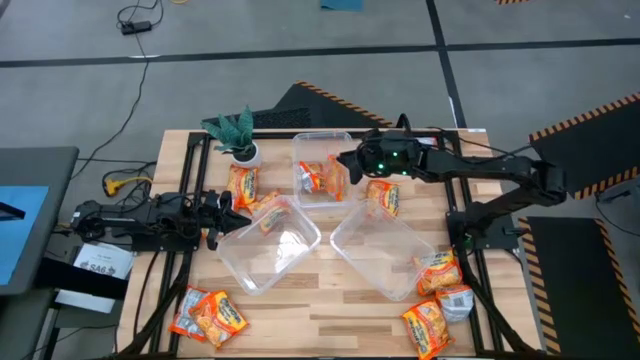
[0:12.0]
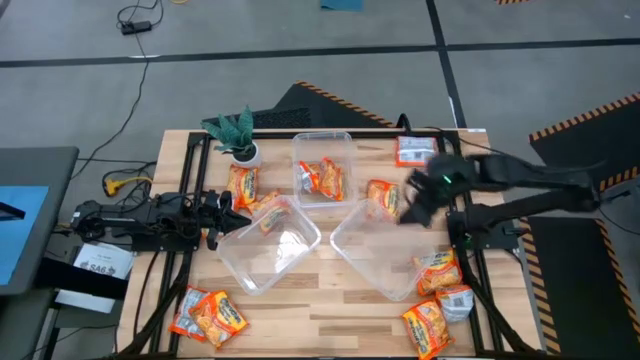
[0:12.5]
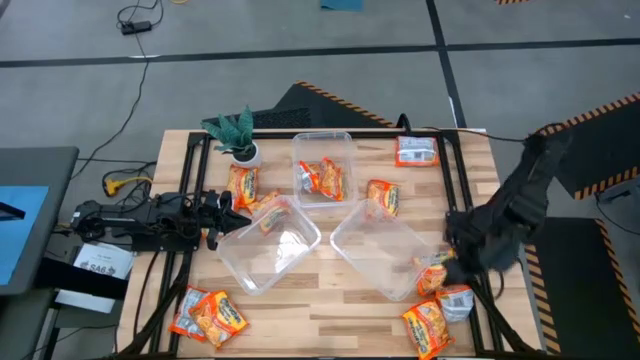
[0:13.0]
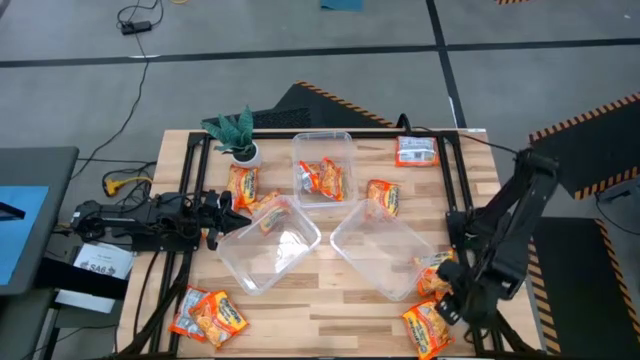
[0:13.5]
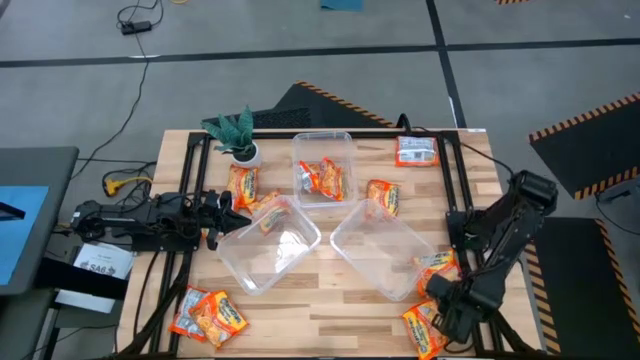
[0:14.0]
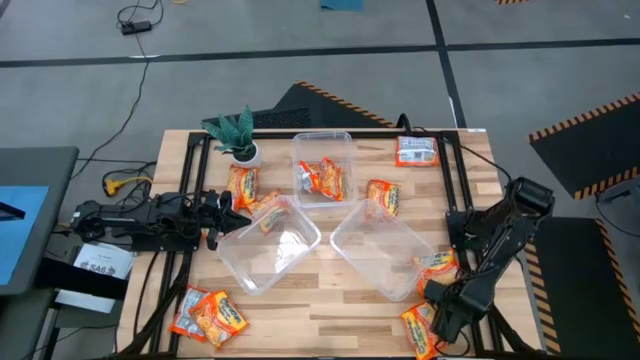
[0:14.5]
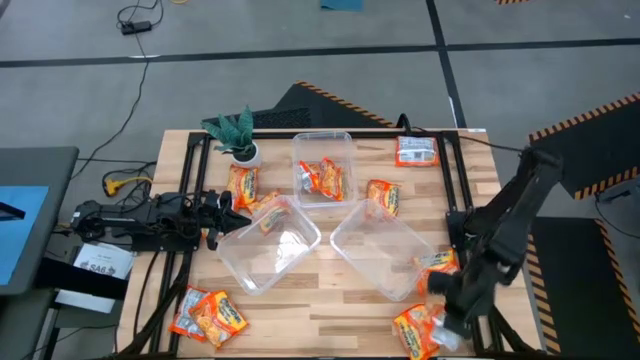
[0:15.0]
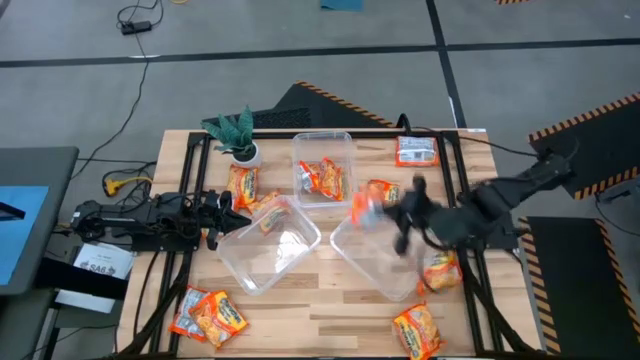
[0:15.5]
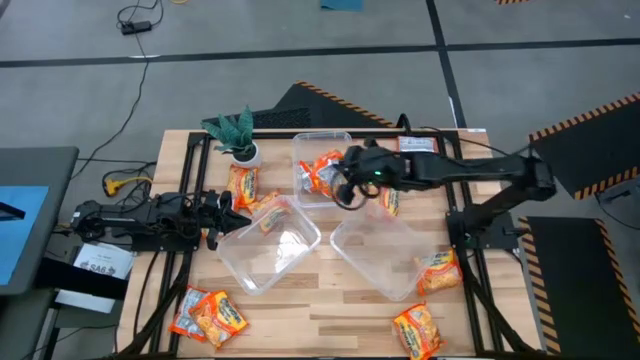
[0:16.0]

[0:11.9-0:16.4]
Task: Sort Maruchan noodles
Put the orange noodle pack into the top transparent container

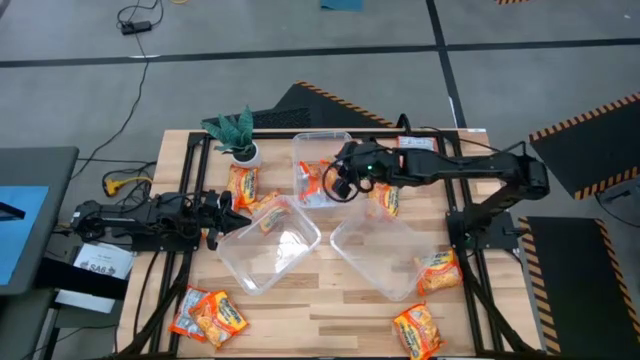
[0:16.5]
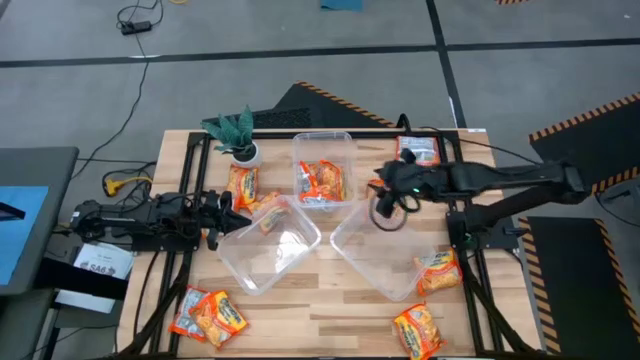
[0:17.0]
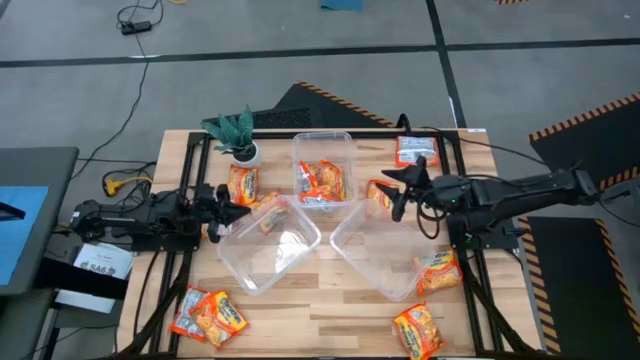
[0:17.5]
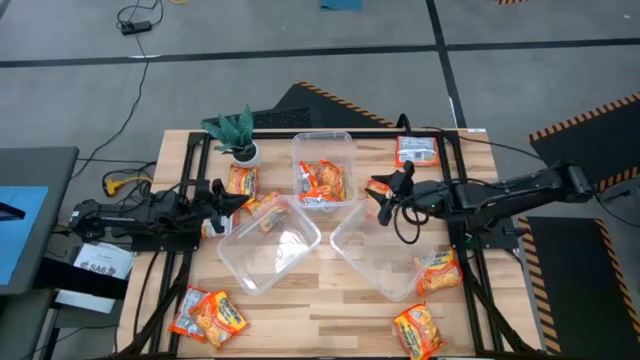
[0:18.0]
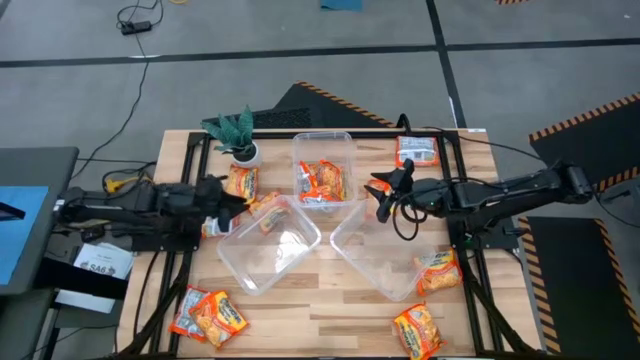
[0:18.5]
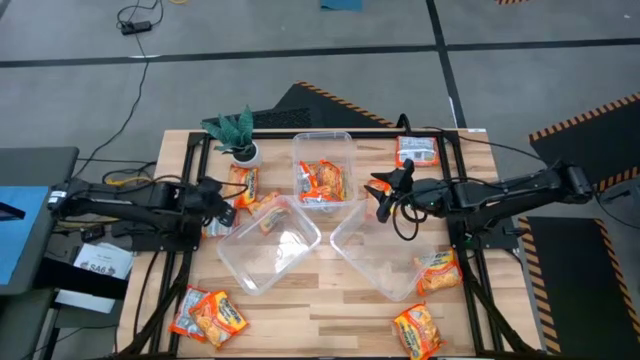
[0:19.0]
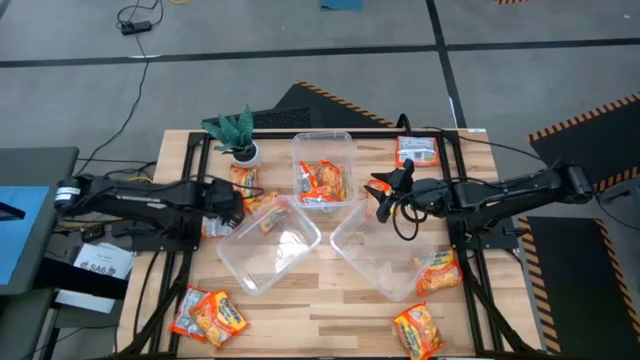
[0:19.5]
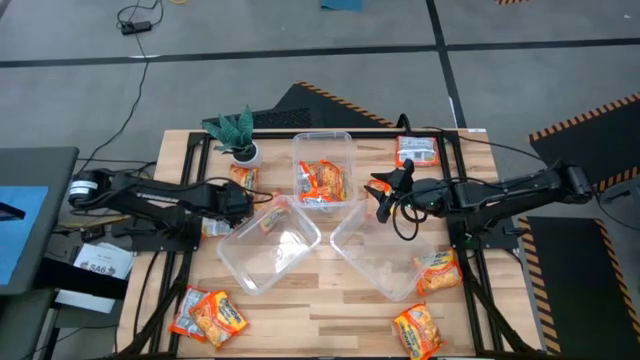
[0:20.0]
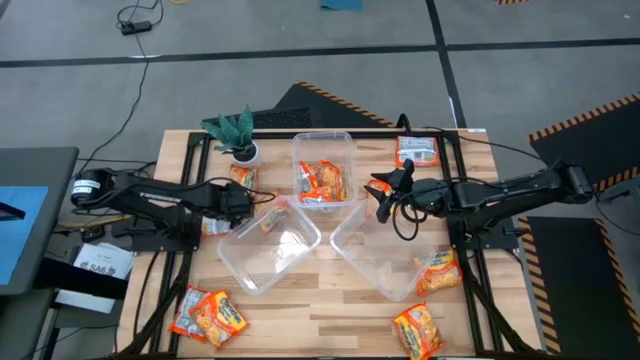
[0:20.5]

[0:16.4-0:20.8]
Put the orange noodle pack into the bottom left transparent container

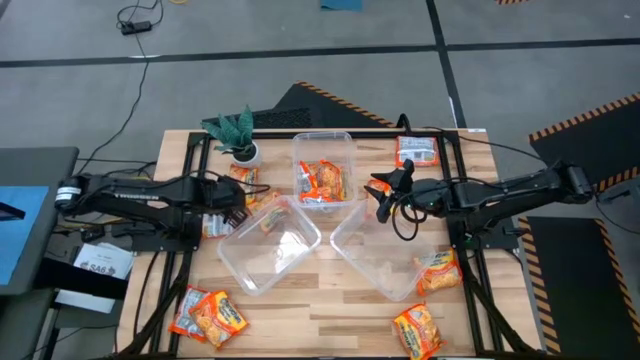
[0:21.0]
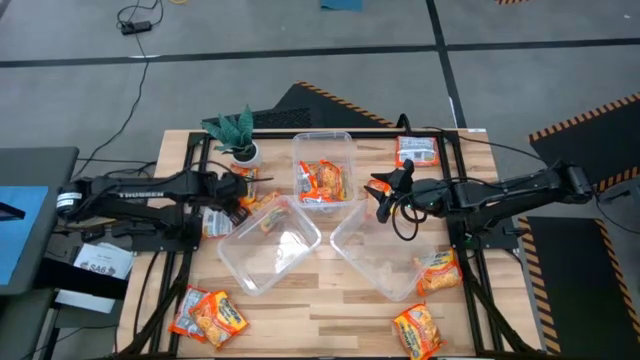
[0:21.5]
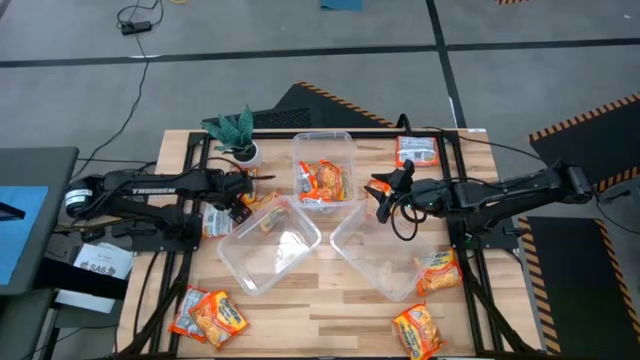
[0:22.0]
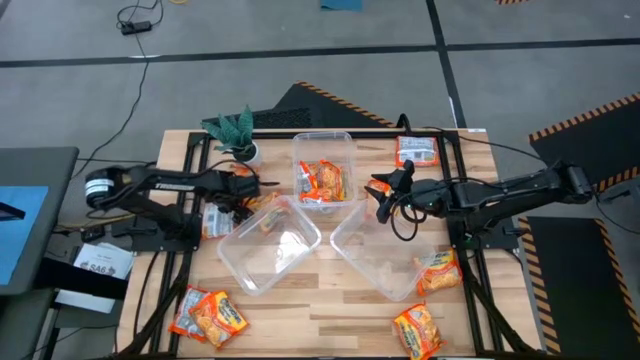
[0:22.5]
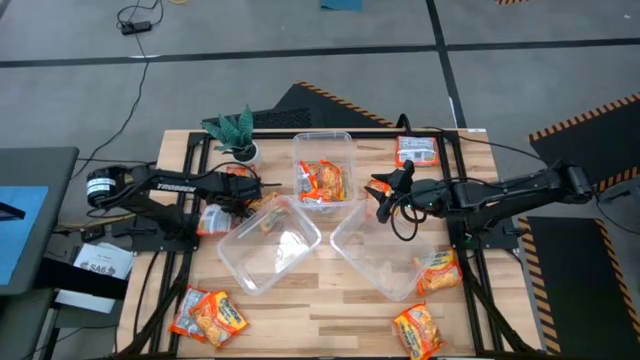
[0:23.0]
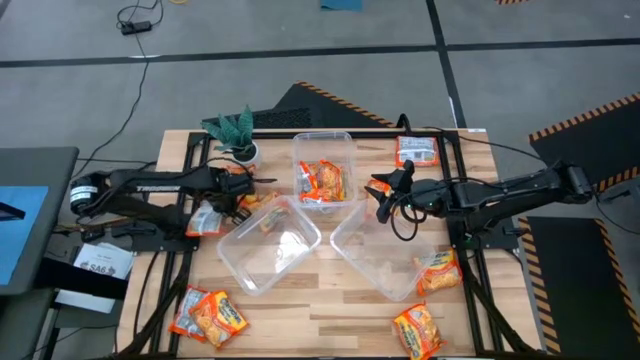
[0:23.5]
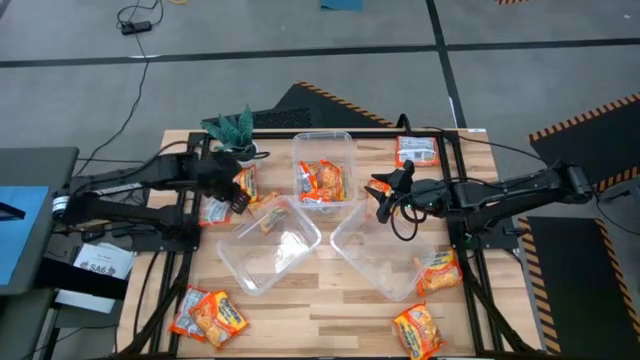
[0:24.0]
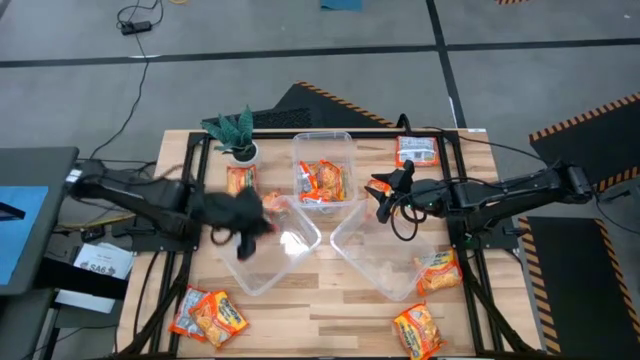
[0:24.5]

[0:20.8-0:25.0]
Put the orange noodle pack into the bottom left transparent container

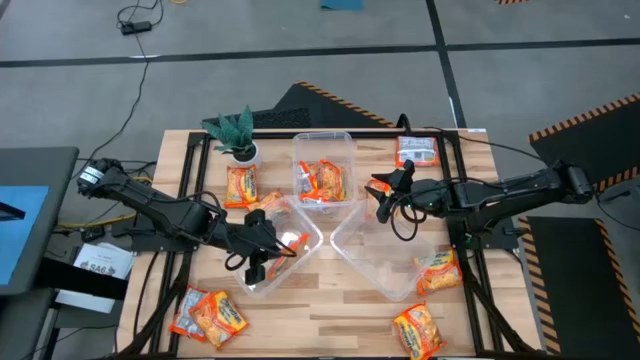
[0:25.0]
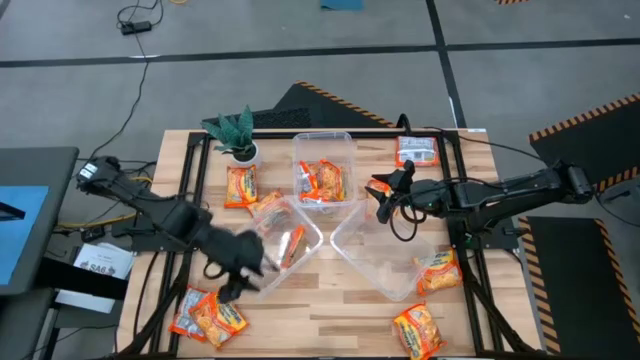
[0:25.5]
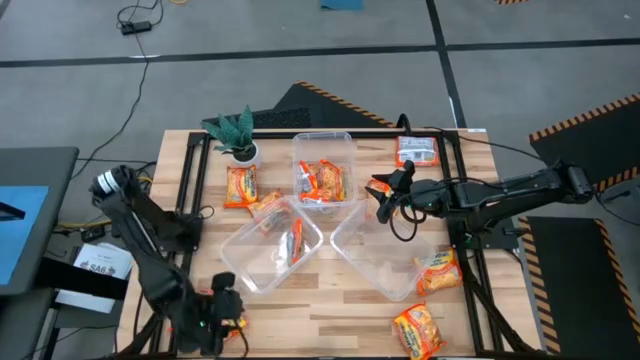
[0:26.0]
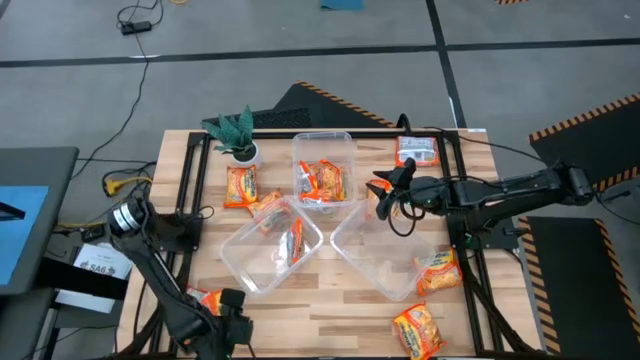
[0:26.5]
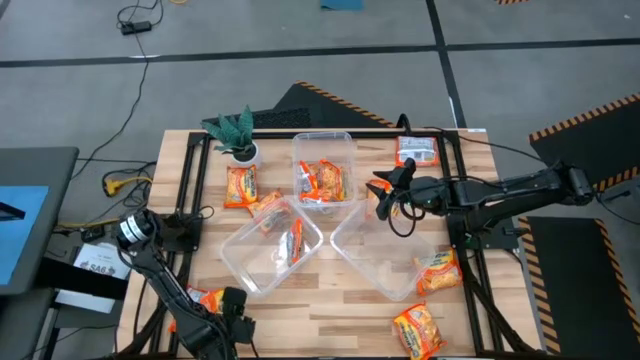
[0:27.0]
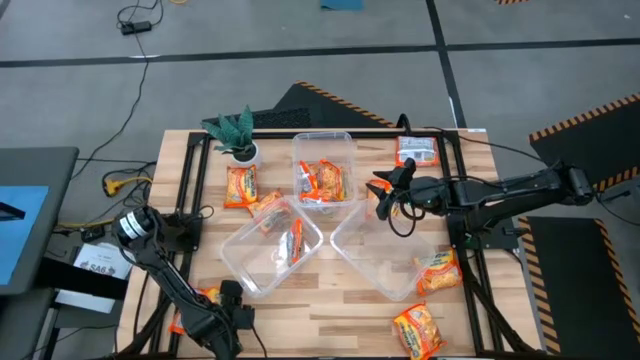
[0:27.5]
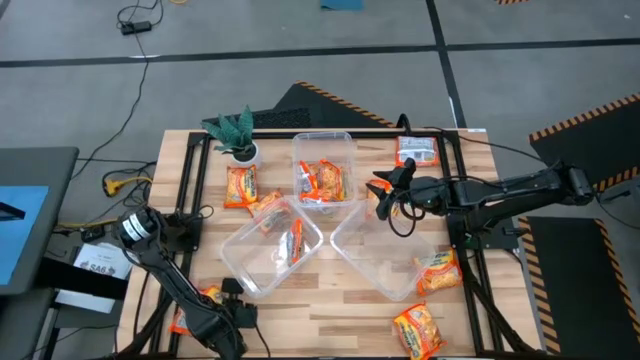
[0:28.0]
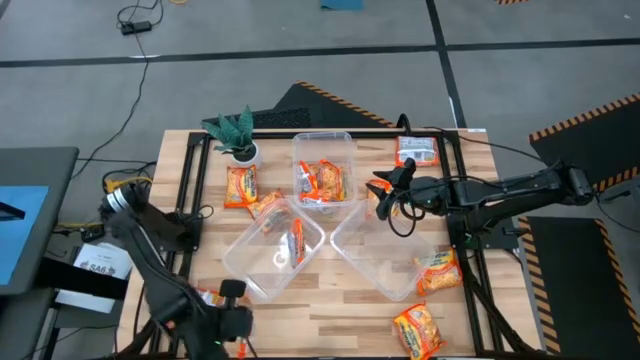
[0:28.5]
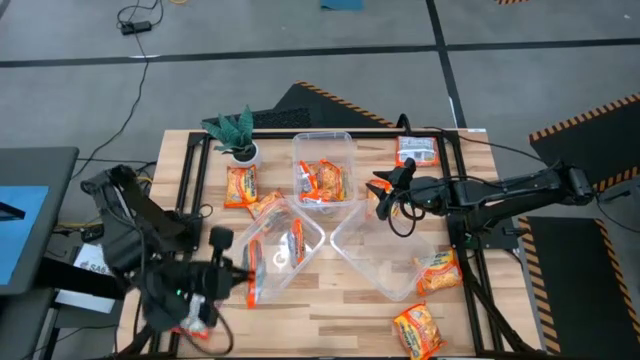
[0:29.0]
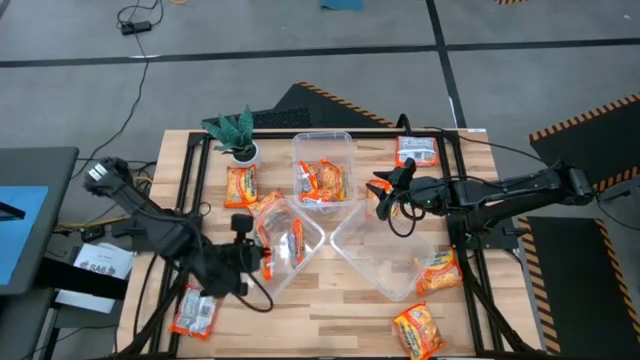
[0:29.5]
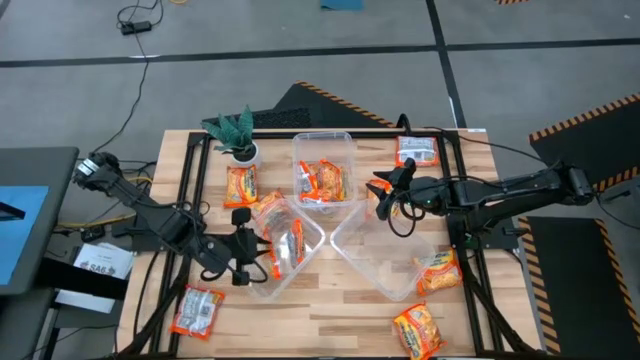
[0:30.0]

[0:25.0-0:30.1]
Put the orange noodle pack into the bottom left transparent container

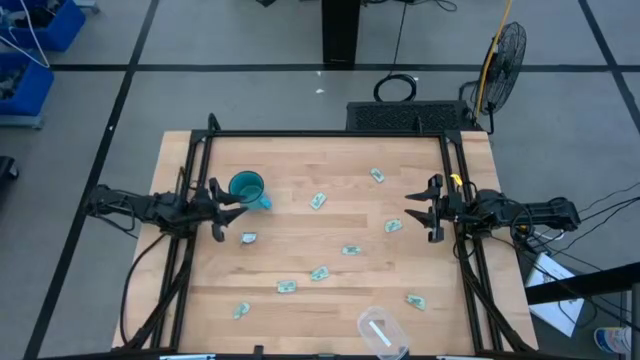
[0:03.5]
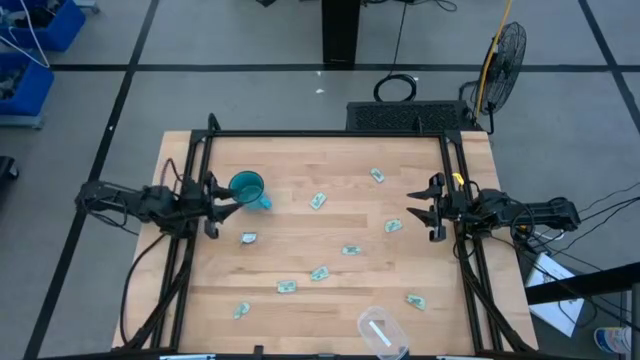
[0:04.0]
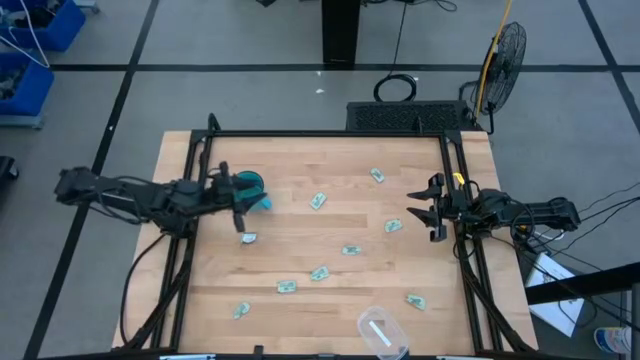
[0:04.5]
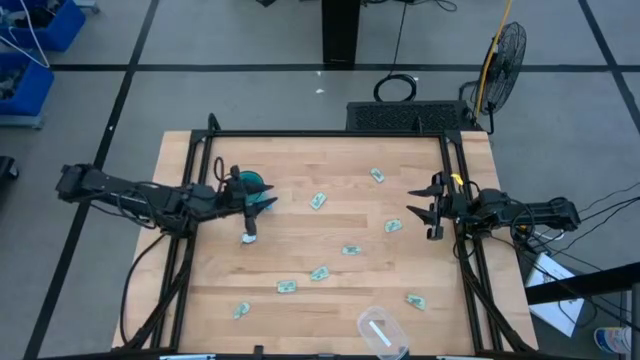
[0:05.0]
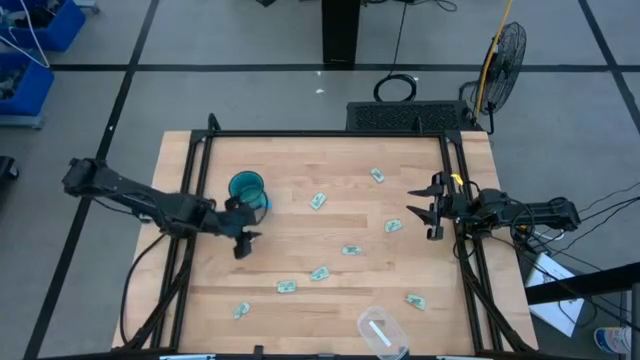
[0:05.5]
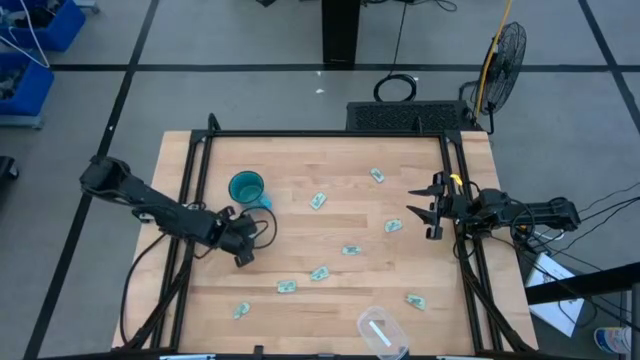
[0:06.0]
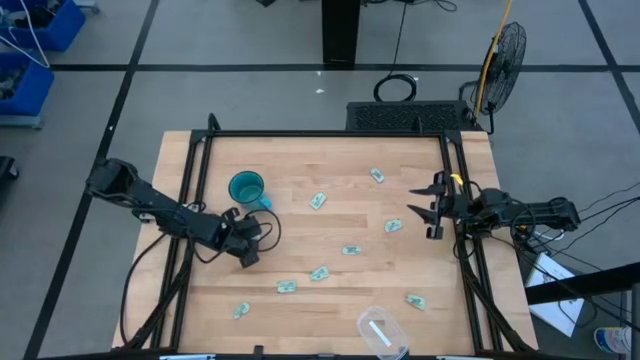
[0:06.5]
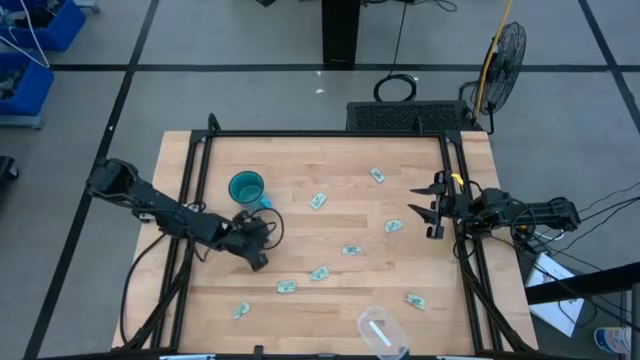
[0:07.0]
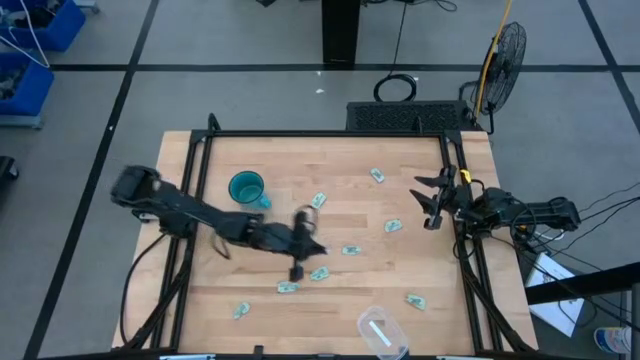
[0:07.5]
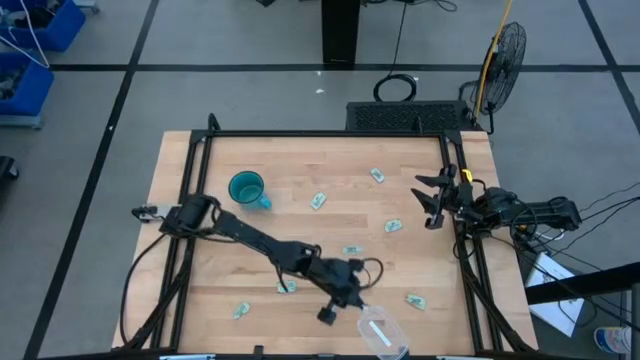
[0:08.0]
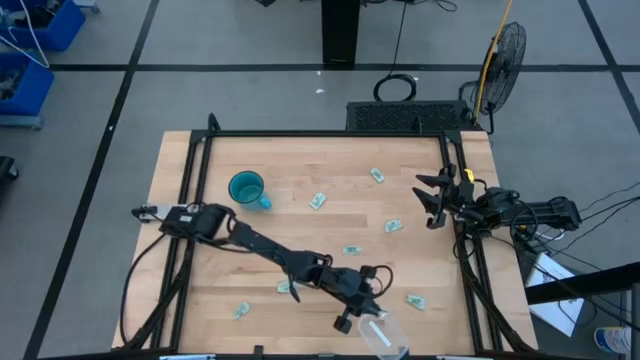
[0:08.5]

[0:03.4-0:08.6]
Task: Pick and place Stevia / Truvia into bins
Put the green stevia packet into the transparent container
